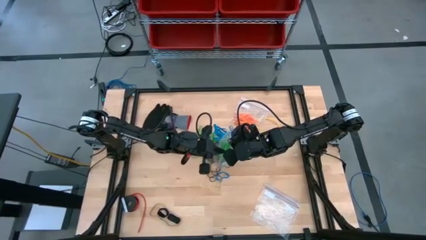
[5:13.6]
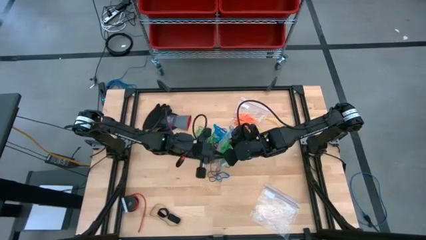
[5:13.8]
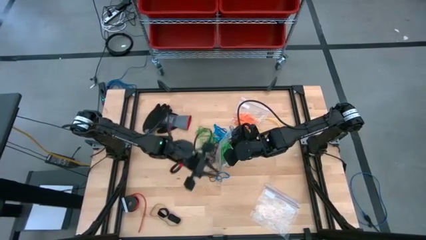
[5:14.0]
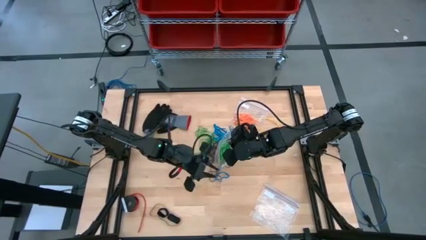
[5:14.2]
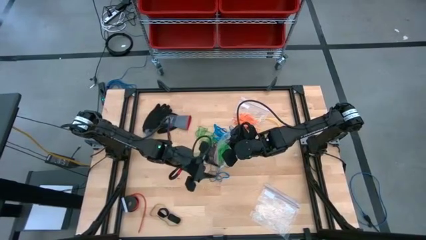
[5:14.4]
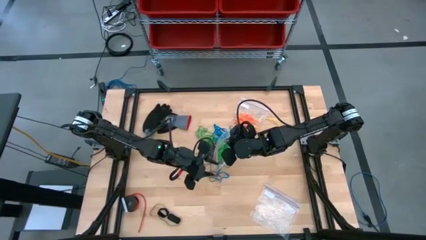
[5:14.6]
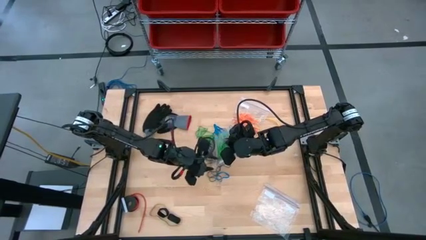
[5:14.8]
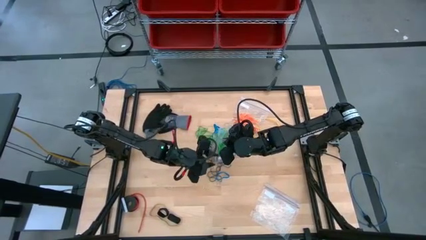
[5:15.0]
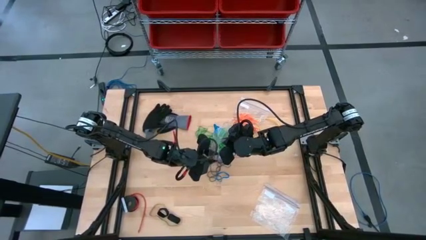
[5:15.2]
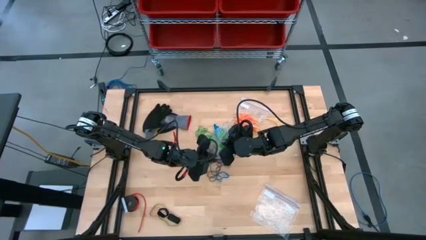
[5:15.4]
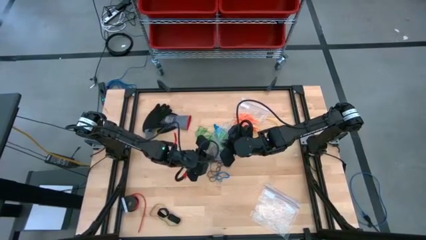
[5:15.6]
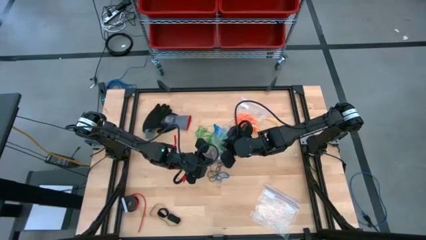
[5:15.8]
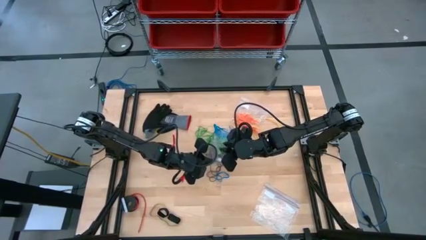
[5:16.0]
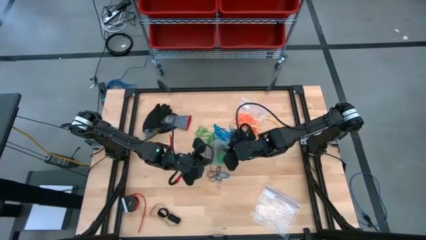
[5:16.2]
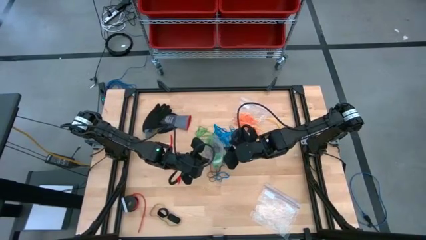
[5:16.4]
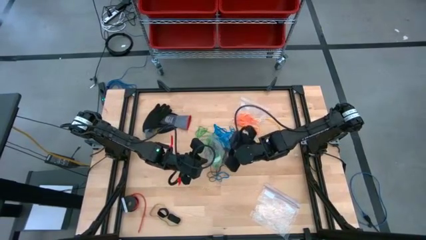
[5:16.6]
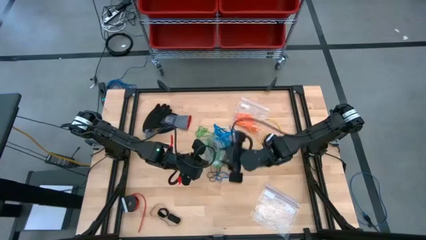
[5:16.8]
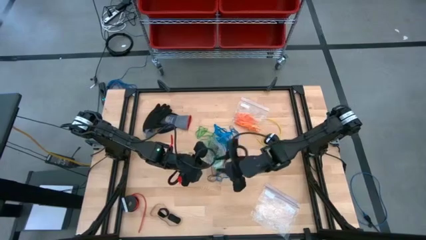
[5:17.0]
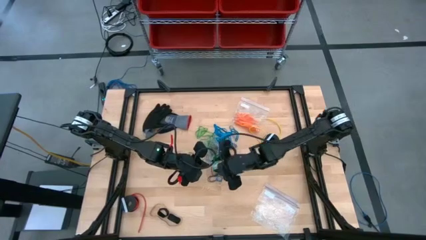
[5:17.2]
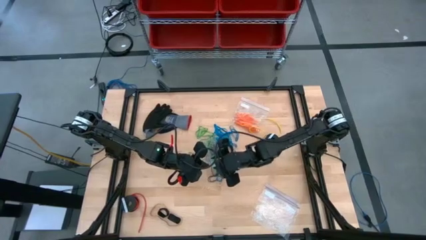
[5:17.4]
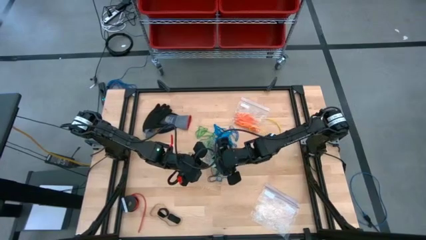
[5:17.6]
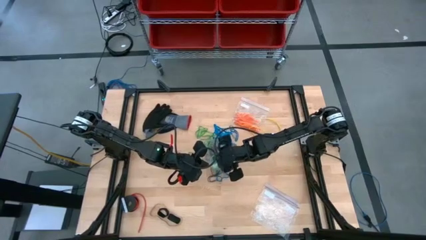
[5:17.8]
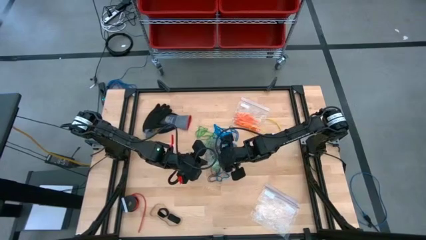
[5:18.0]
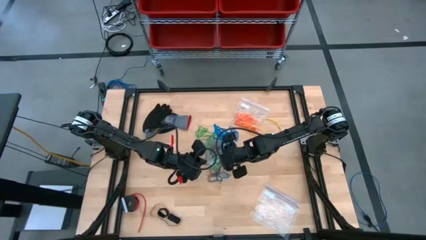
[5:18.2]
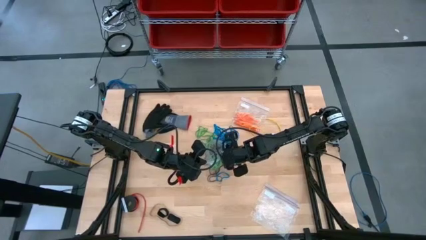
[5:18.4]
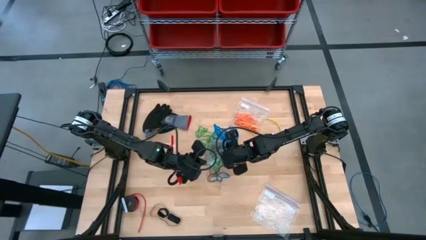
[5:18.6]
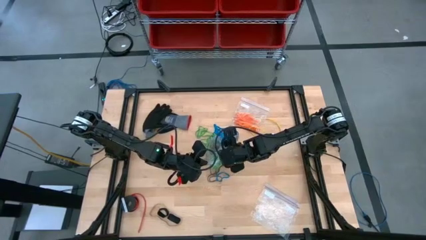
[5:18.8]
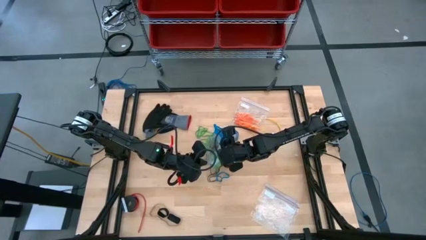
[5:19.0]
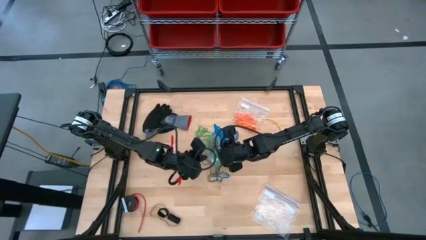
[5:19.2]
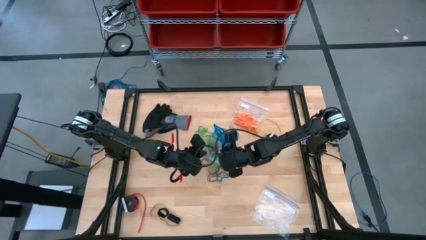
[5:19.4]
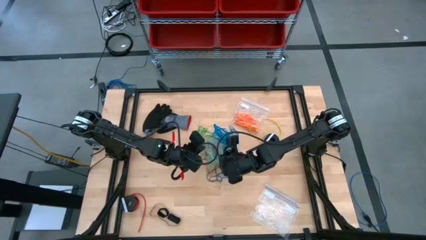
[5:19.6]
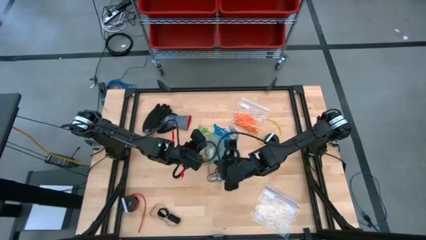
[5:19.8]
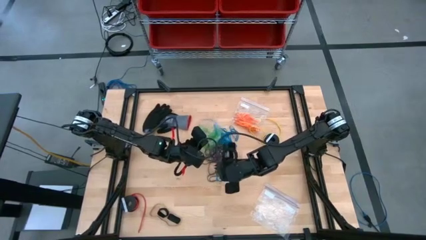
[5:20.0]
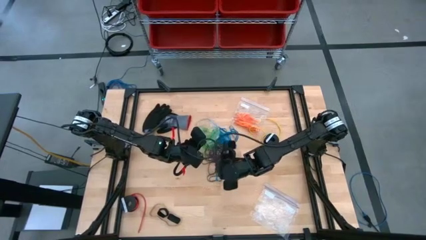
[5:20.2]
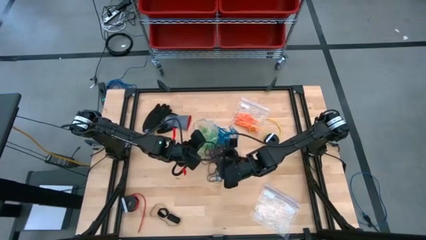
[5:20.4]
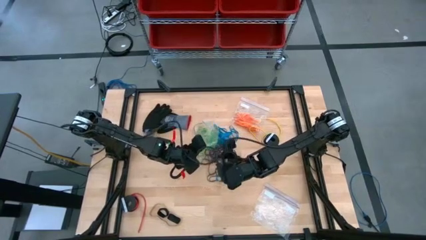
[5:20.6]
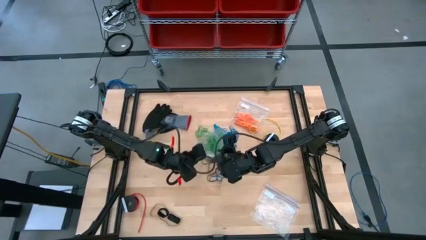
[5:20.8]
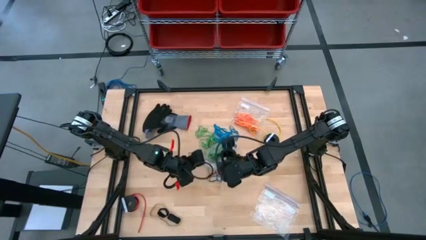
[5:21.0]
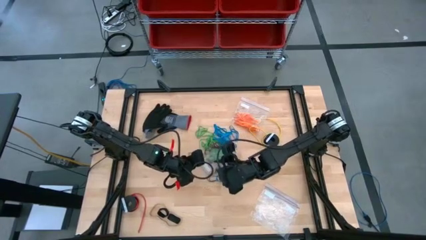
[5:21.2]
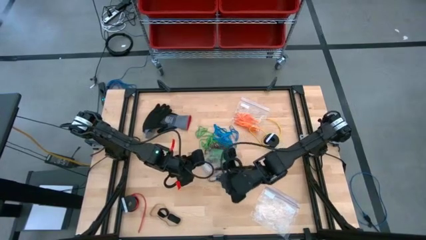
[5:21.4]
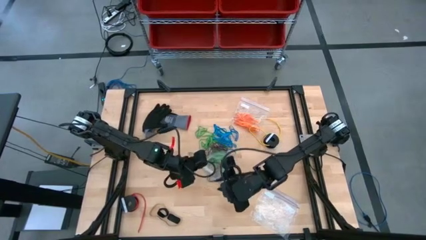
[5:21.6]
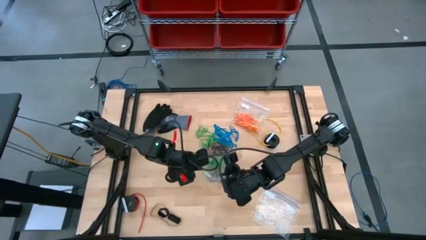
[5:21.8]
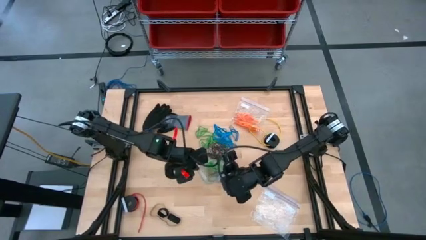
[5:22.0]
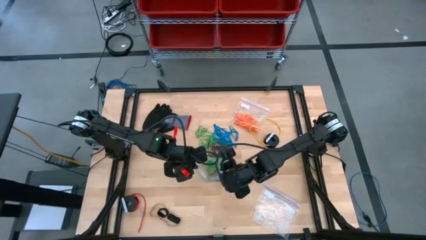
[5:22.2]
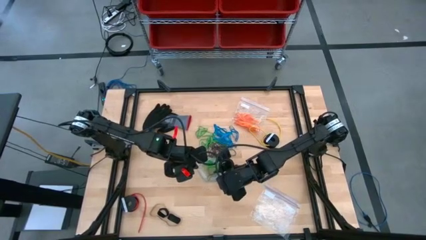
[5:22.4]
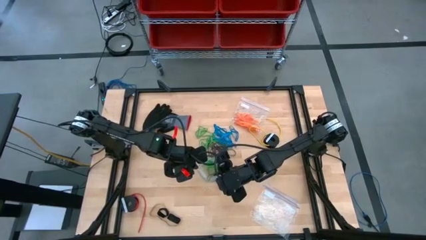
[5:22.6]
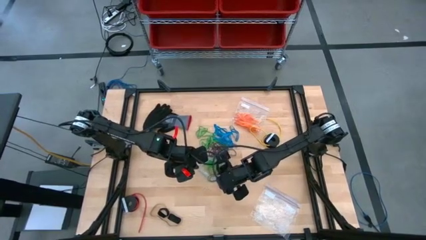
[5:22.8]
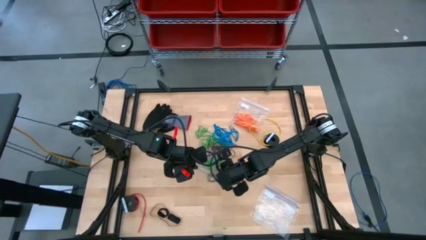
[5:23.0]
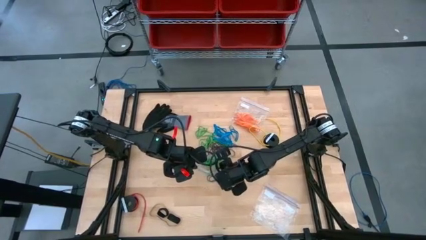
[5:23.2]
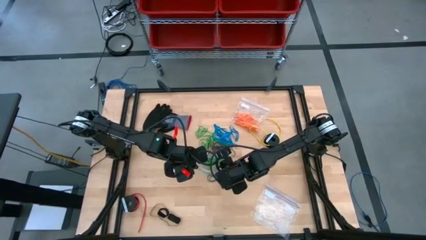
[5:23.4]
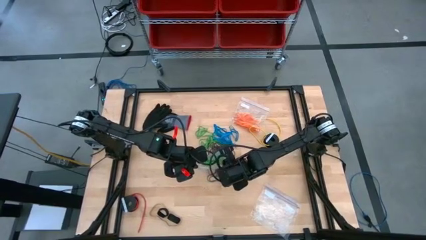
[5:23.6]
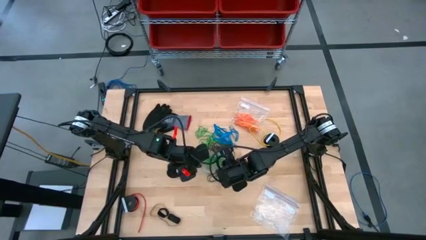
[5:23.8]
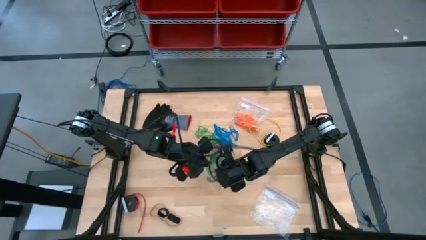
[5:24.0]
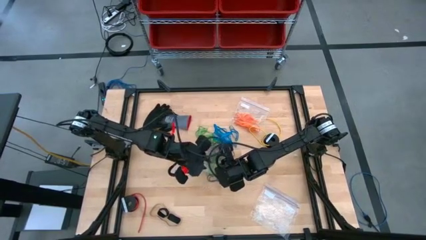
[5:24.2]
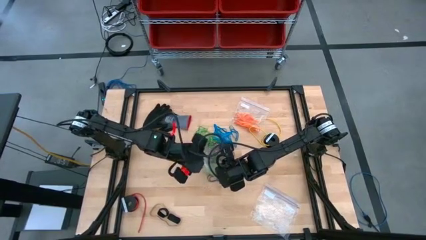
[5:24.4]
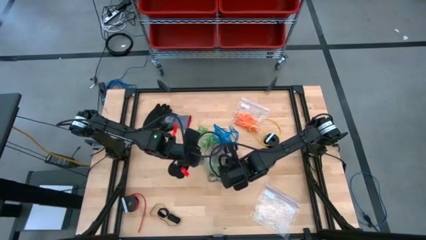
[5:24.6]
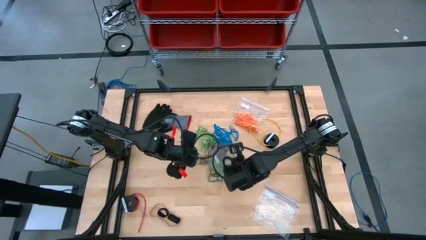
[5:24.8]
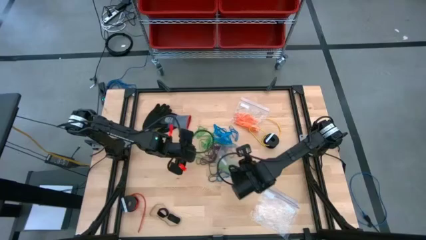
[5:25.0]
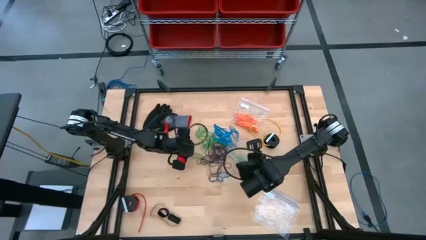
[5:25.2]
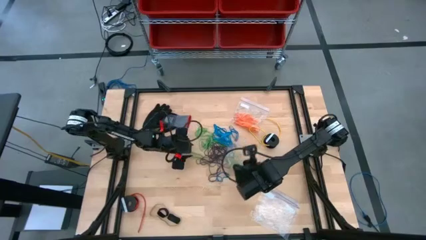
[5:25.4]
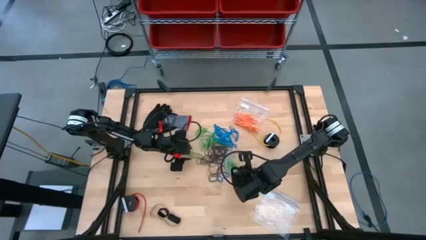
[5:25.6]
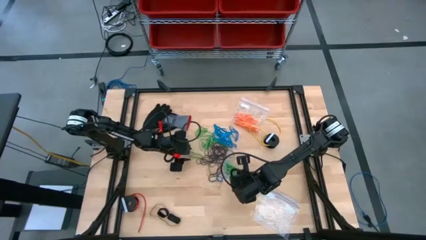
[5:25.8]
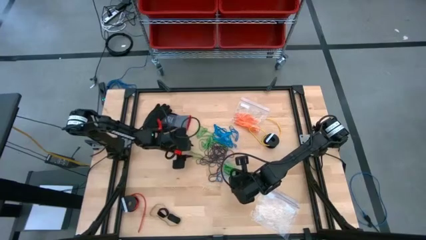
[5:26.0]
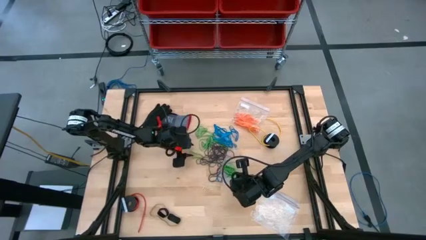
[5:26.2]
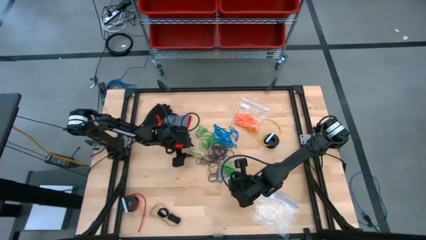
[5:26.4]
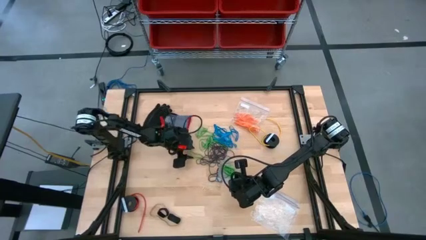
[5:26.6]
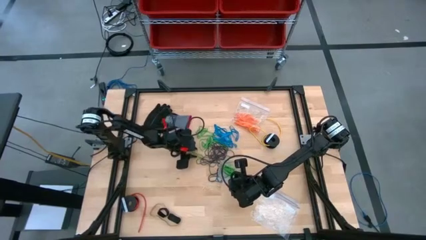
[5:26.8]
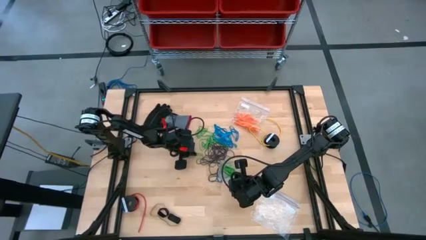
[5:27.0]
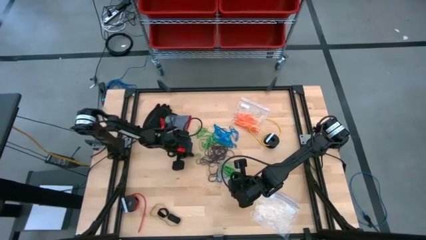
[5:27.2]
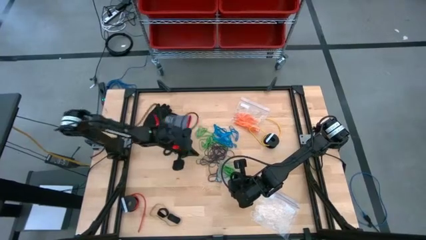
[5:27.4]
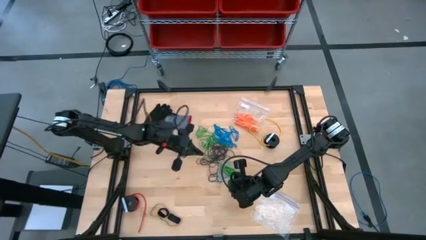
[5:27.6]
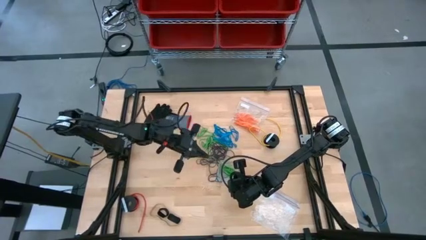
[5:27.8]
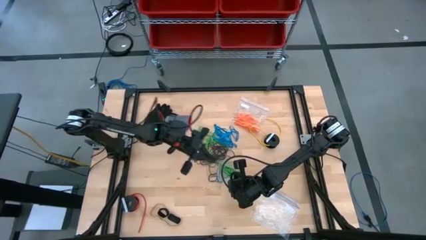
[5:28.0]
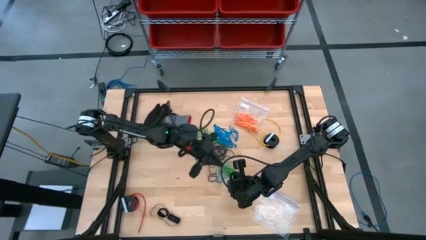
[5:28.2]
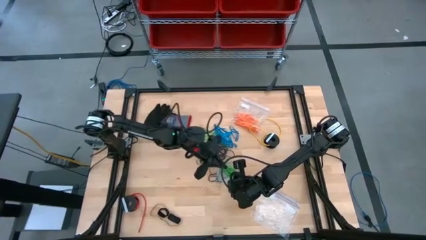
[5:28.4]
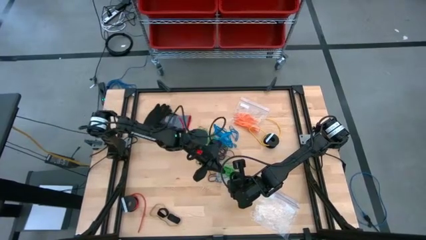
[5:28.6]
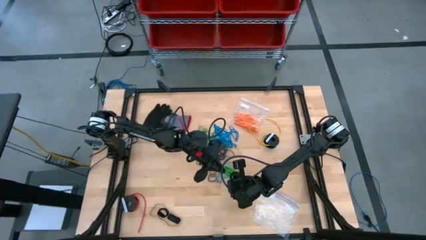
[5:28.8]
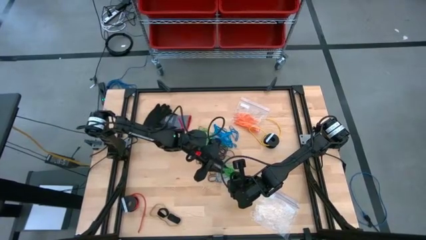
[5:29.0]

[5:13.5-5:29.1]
Task: Sort rubber bands
Put the green rubber band into the transparent zip bag

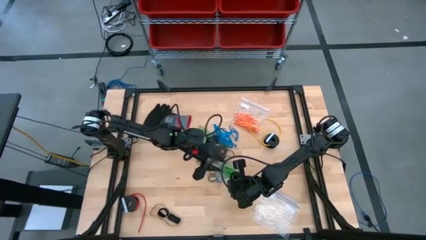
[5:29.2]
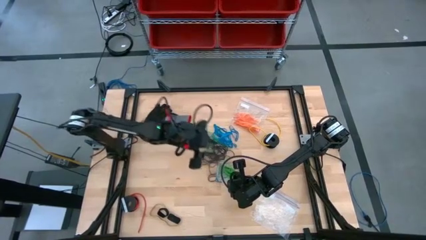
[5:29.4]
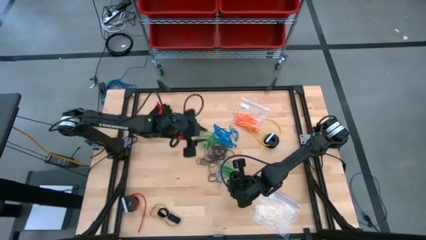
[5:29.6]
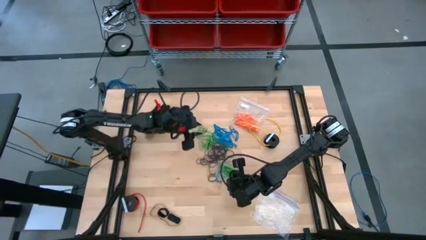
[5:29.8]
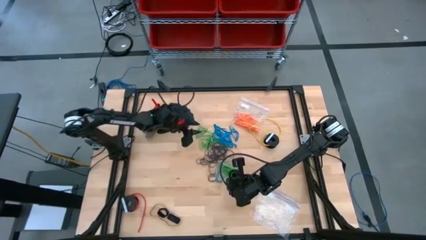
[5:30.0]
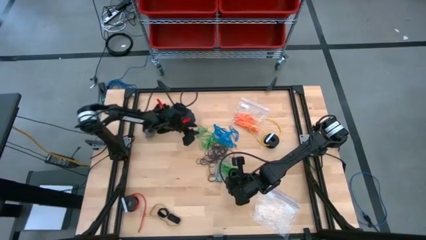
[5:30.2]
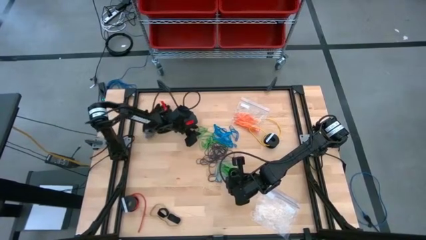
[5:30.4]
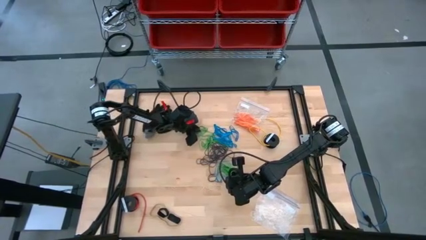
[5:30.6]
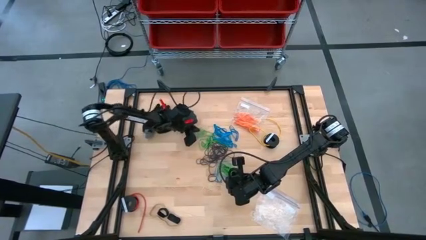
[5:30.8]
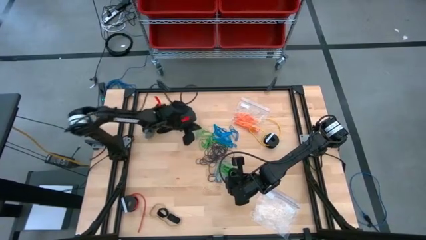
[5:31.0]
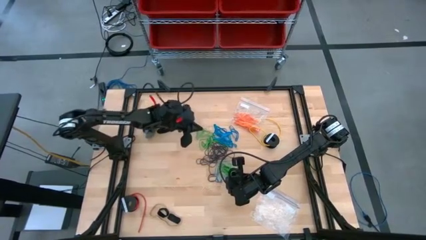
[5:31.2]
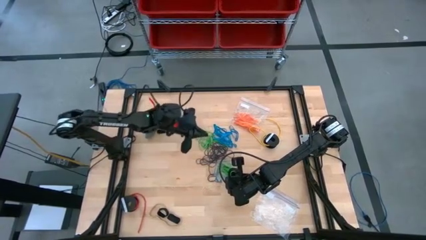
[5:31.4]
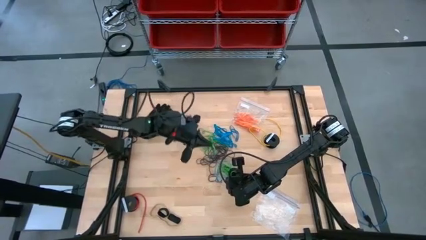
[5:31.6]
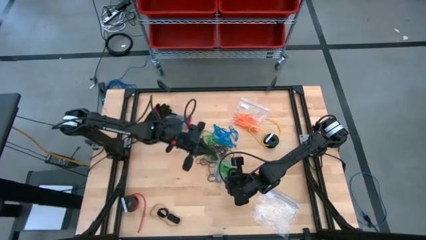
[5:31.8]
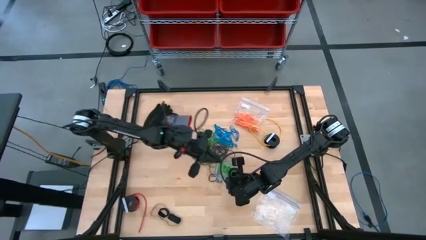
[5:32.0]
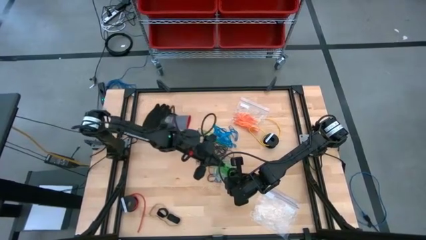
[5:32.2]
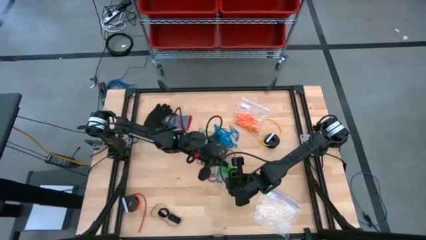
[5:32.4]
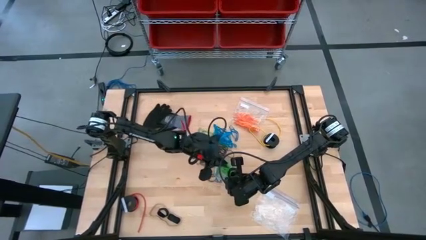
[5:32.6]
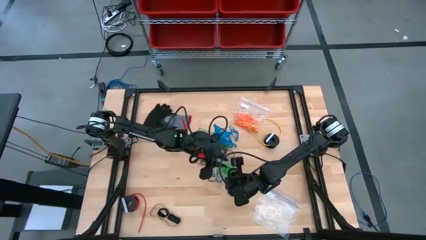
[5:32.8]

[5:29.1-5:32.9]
Put the green rubber band into the transparent zip bag
